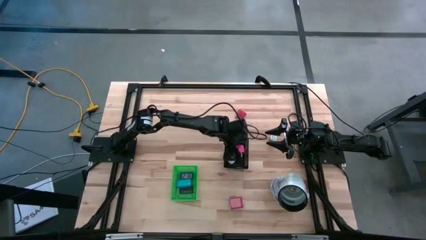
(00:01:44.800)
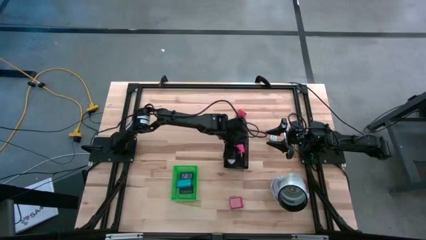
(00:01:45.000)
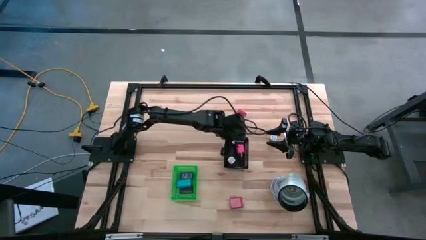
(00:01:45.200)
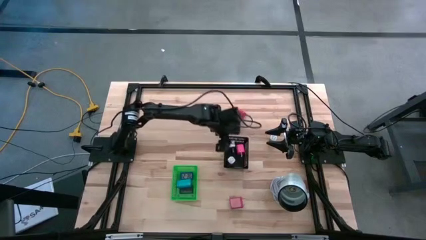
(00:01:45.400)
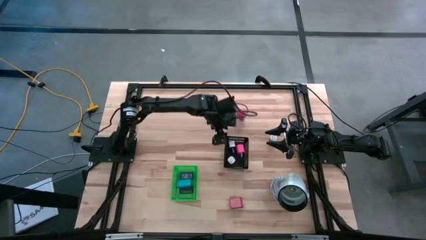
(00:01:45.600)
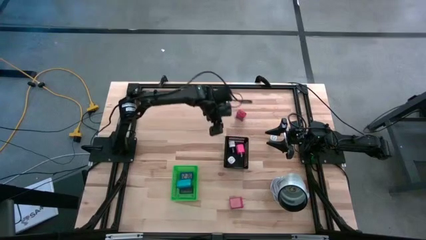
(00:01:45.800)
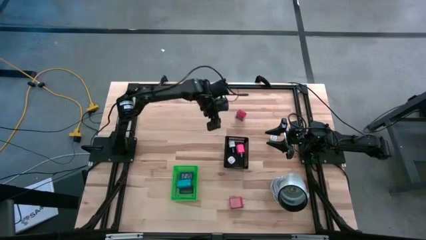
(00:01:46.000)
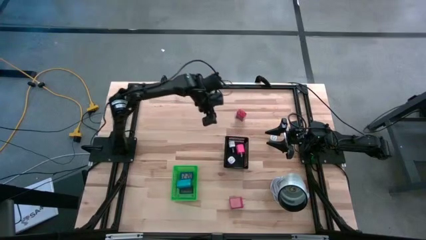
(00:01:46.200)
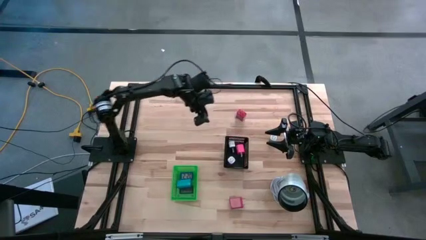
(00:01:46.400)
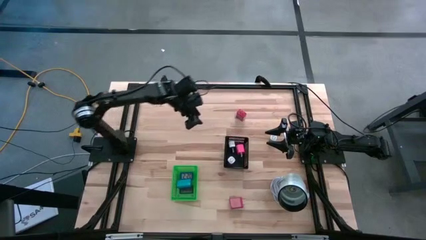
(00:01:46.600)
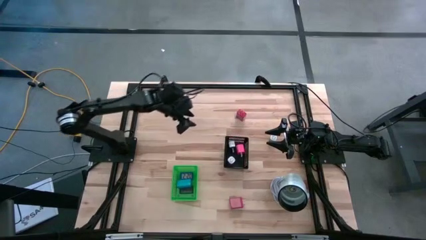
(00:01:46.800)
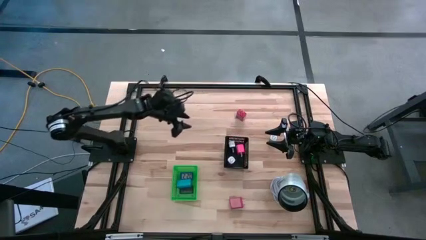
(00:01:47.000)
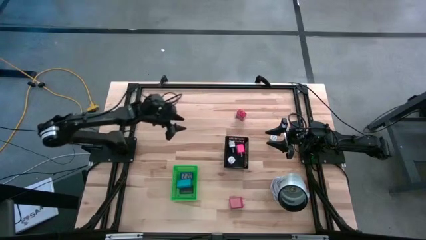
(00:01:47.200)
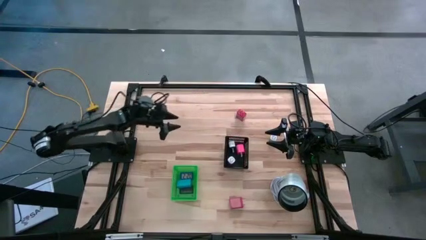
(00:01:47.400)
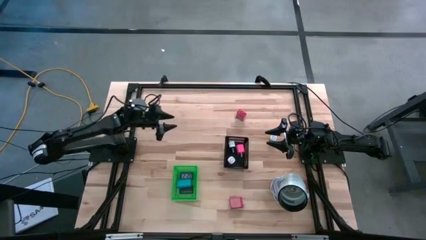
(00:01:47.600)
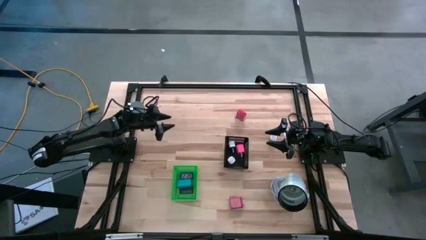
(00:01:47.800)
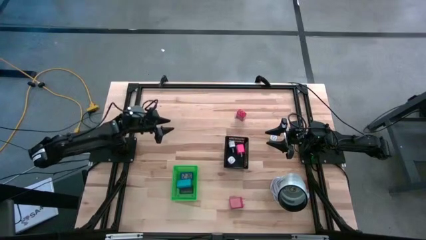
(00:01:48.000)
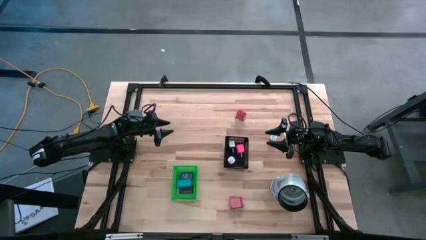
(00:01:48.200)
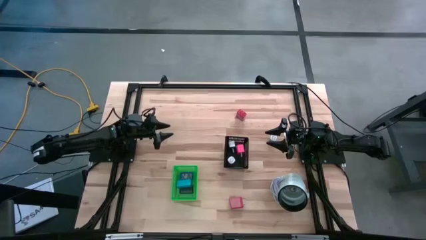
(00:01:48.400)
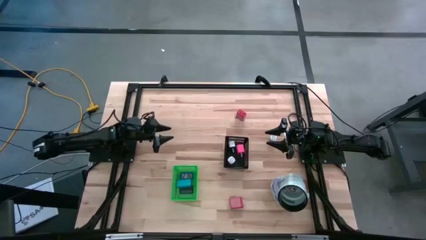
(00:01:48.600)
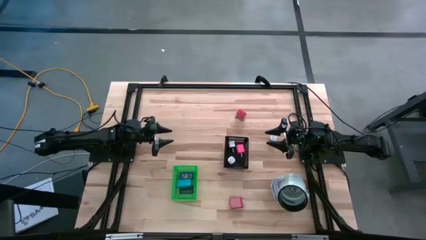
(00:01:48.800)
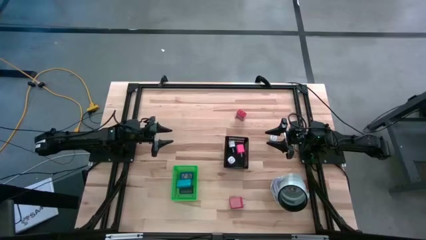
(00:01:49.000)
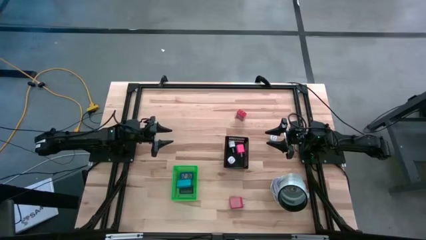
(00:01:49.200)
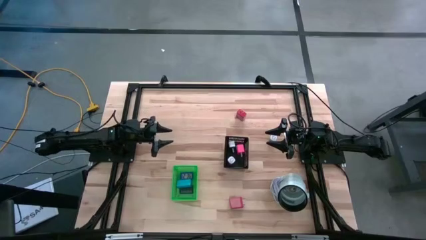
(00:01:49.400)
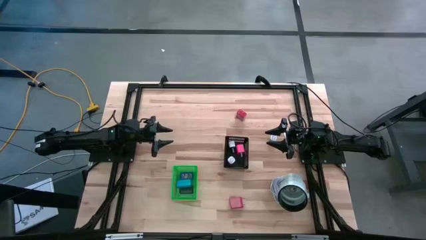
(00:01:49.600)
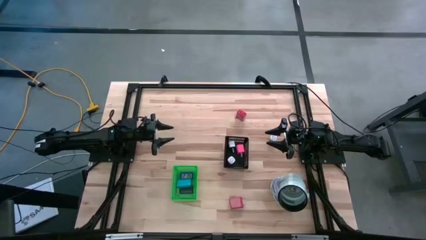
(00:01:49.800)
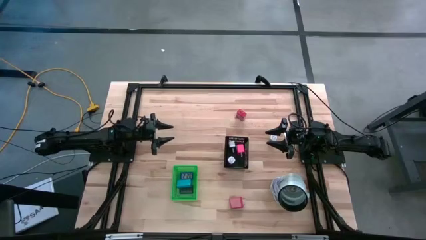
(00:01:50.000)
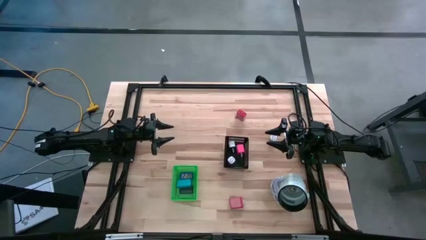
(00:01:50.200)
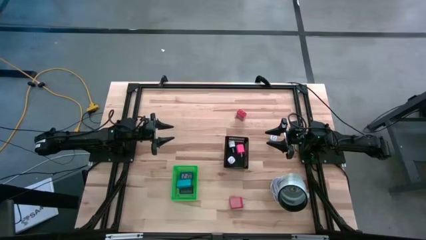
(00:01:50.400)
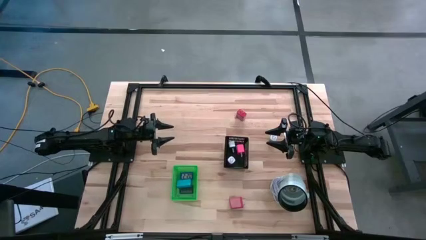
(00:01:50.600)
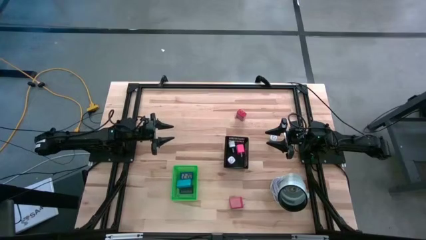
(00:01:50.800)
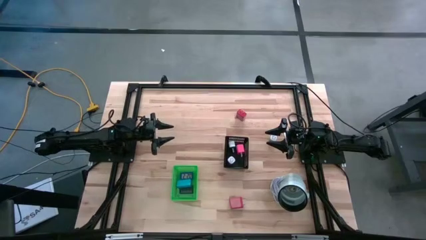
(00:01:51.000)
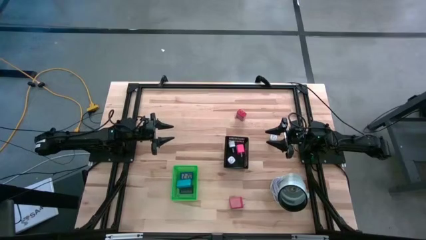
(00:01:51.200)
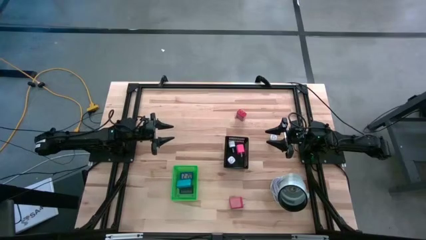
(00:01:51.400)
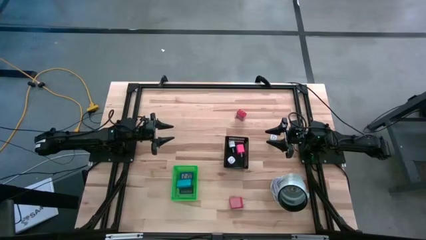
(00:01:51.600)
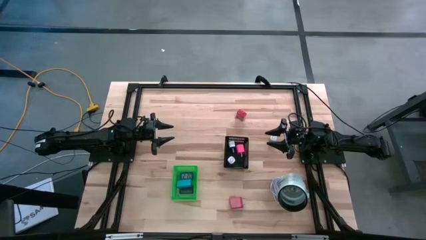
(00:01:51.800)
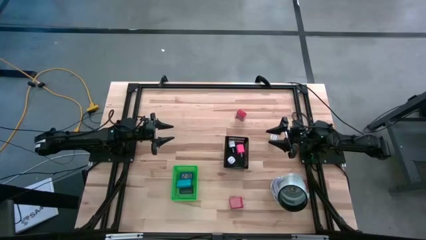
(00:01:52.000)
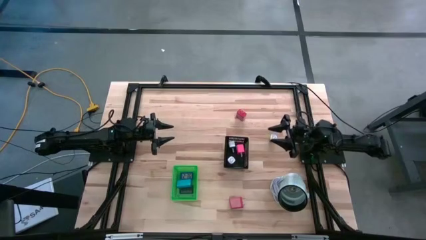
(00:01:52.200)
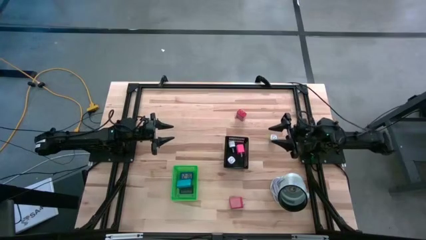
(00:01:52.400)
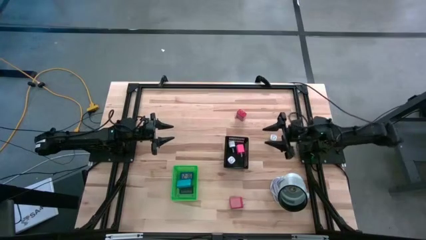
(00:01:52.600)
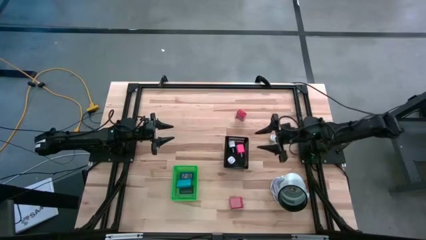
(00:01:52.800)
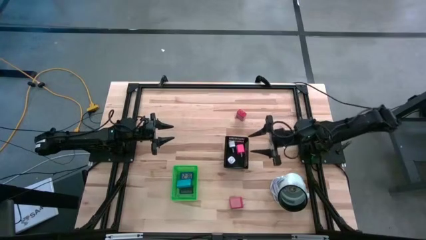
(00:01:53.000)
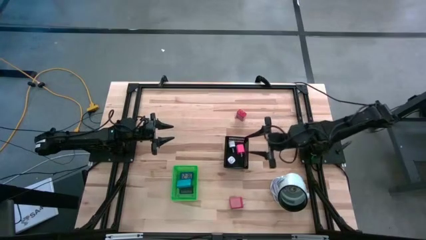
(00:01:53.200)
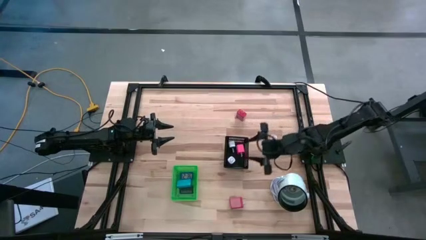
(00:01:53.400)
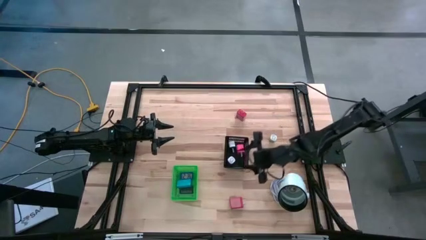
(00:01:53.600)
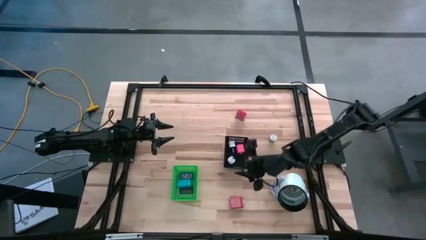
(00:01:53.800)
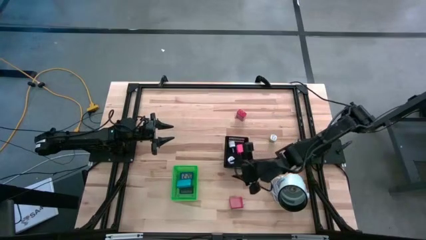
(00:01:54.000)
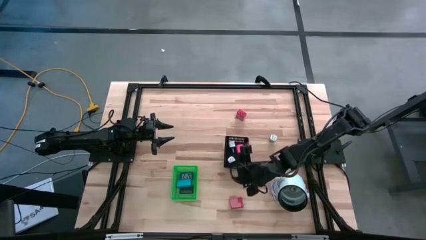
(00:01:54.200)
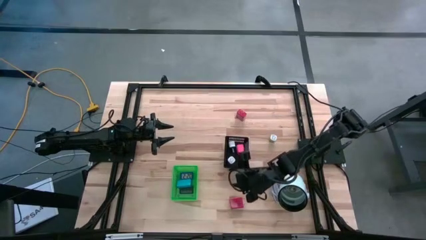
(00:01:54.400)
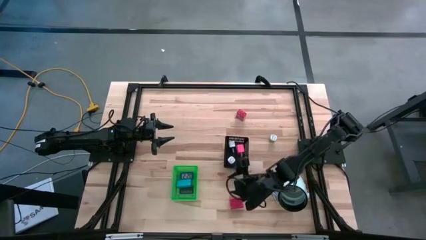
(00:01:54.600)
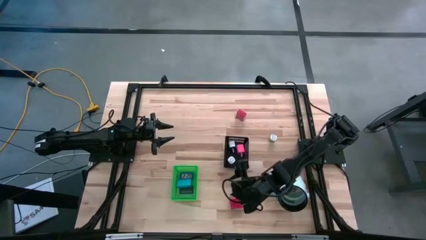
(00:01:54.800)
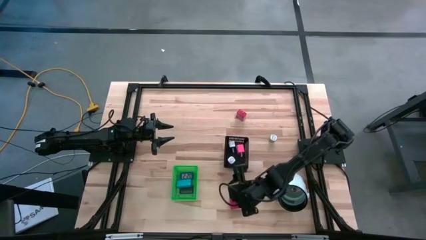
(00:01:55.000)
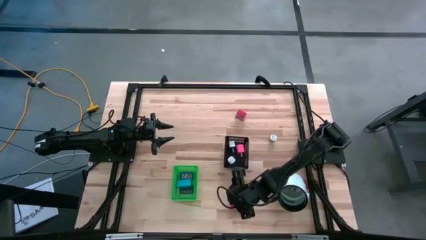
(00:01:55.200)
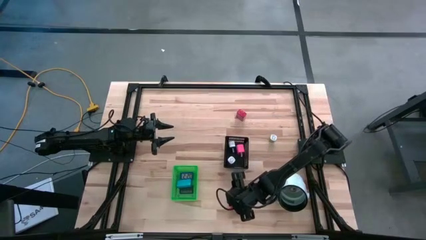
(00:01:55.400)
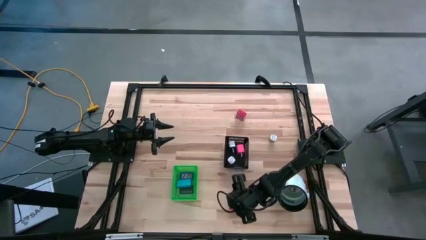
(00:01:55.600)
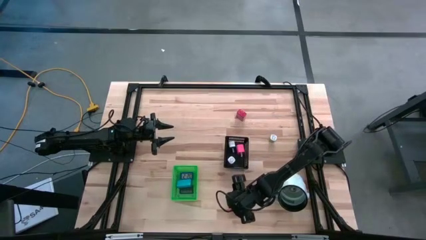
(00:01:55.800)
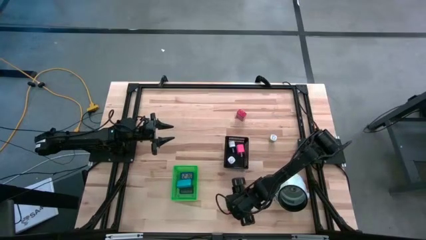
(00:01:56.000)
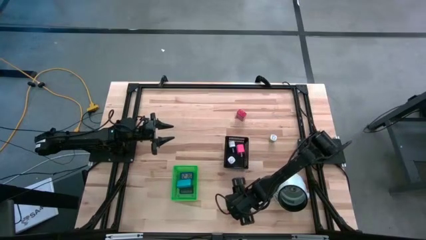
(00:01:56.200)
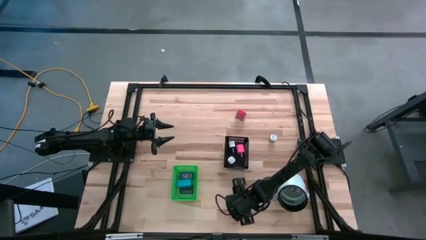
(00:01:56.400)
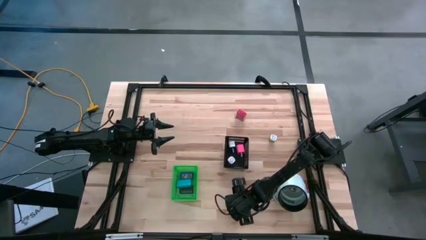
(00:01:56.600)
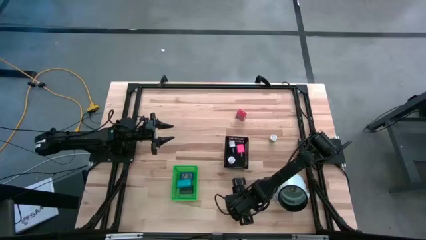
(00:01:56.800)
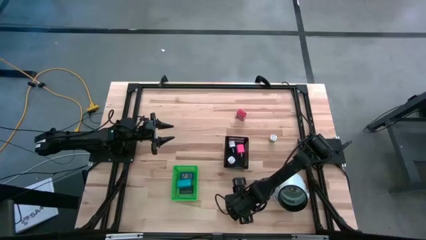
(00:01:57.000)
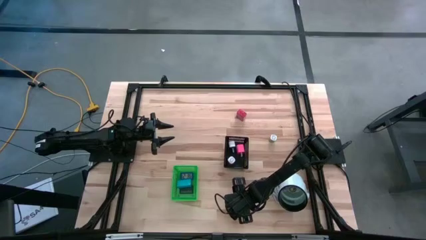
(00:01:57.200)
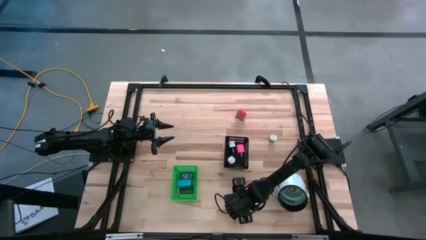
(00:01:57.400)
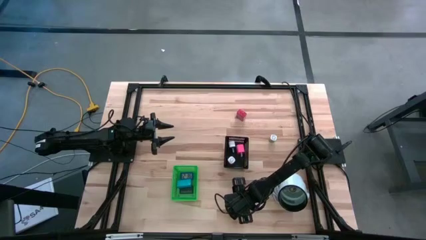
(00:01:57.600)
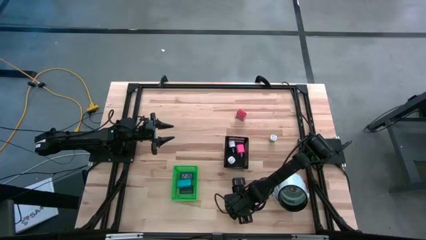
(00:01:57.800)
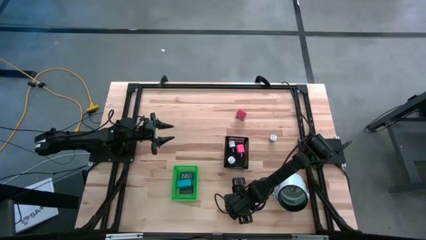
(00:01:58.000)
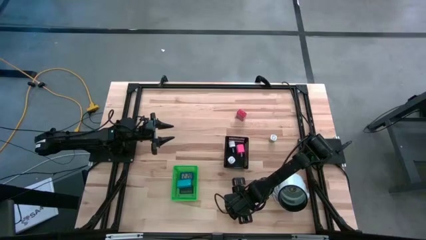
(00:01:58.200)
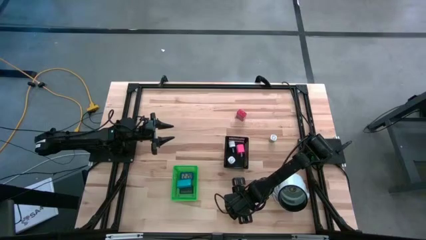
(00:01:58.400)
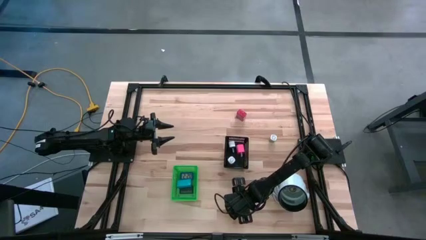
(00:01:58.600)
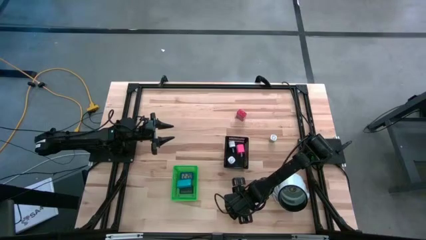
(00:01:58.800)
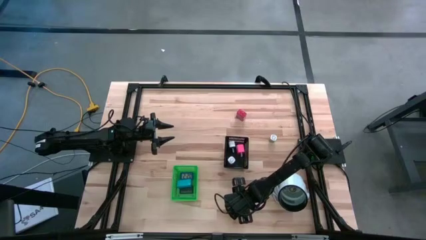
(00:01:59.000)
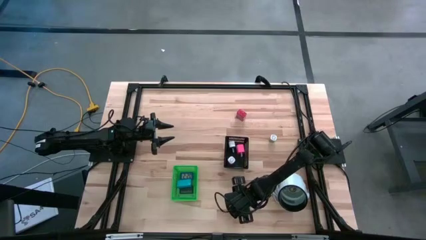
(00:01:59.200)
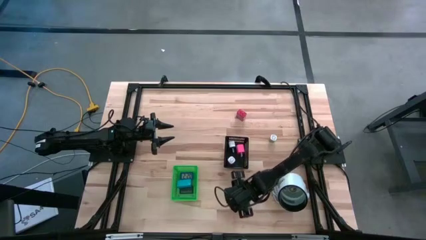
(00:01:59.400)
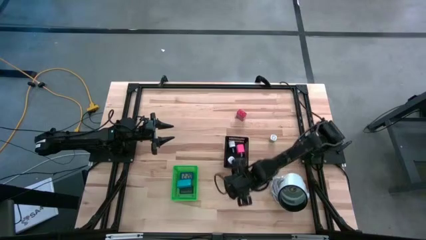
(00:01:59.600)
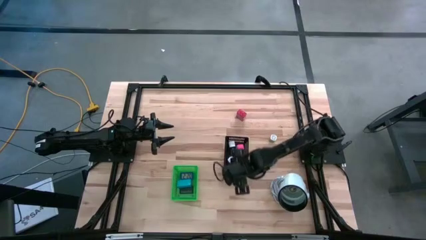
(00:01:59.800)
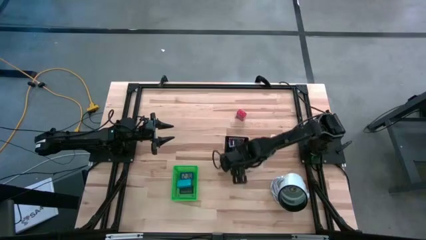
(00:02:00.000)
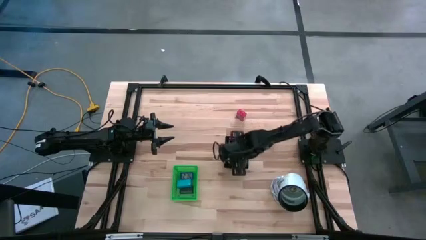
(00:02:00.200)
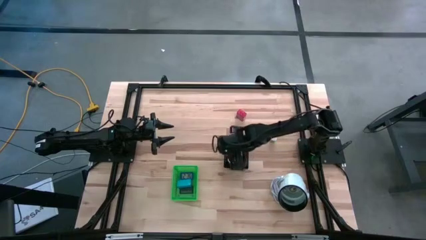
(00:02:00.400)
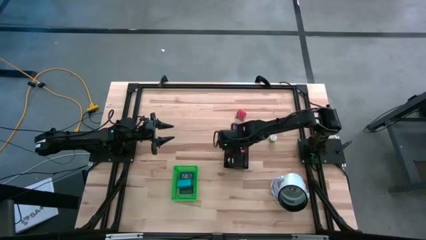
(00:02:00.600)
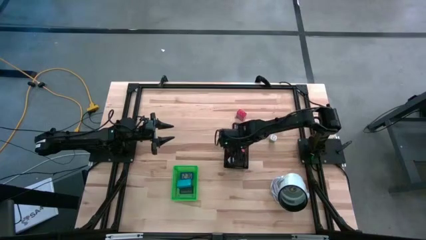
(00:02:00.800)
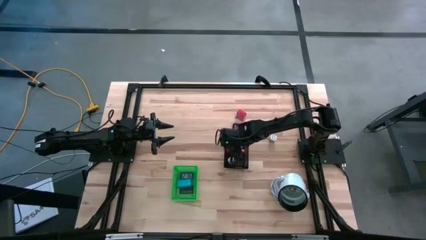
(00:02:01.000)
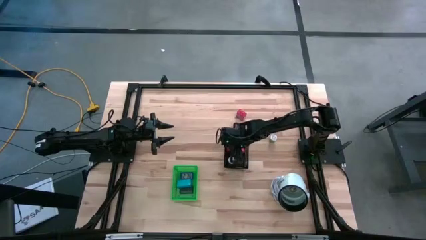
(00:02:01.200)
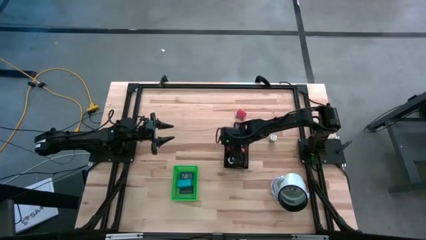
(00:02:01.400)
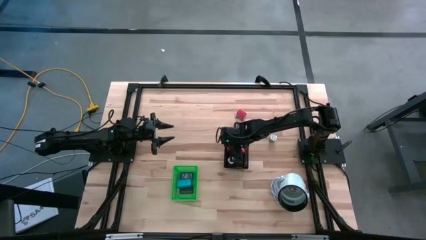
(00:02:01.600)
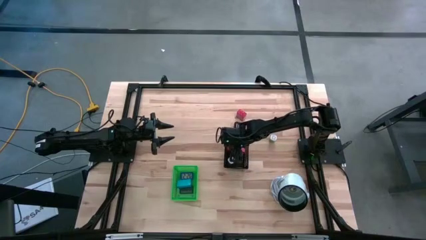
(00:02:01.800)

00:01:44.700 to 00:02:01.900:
Task: Pick & Place Office items
Put the bottom red charger adapter into the black bin
